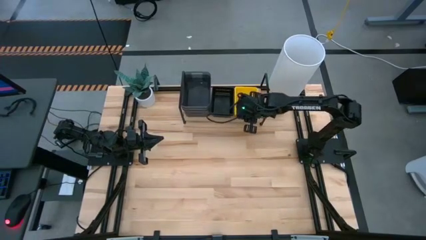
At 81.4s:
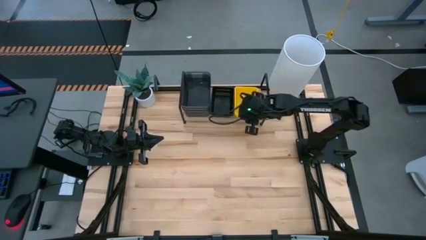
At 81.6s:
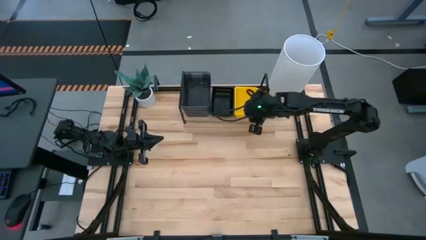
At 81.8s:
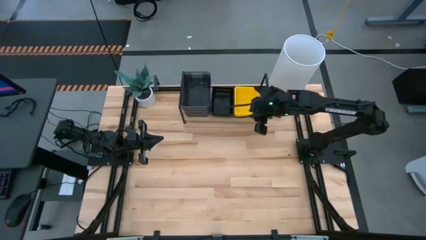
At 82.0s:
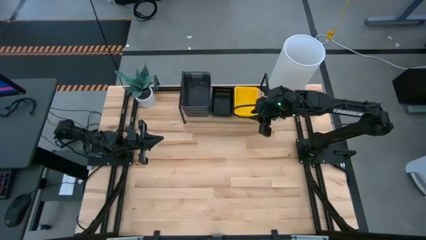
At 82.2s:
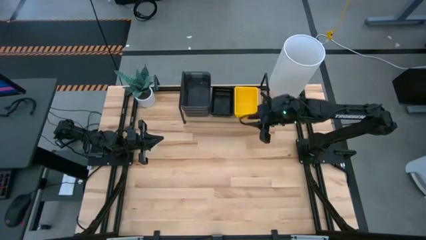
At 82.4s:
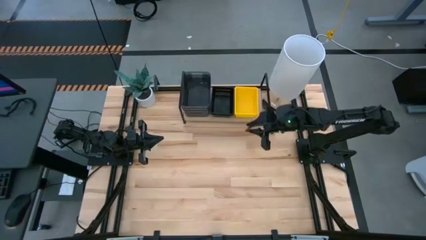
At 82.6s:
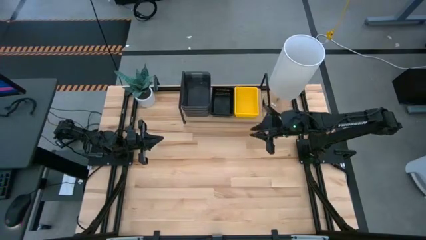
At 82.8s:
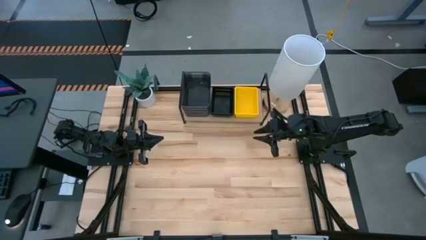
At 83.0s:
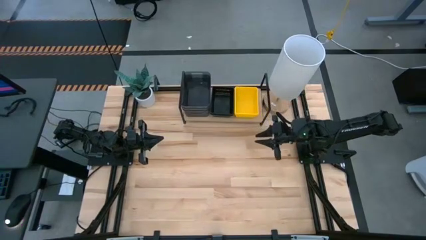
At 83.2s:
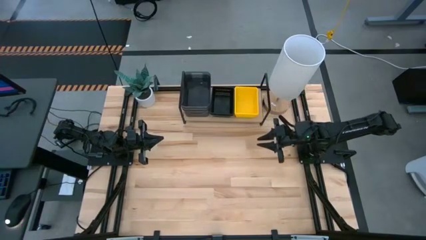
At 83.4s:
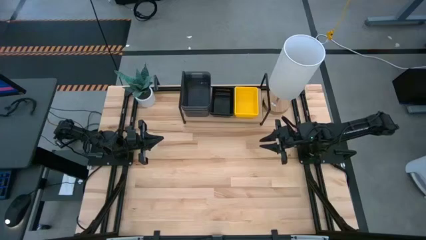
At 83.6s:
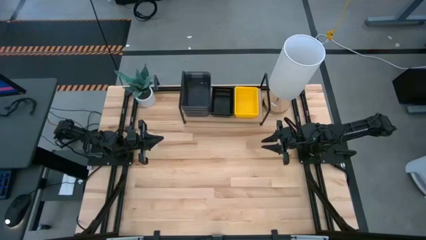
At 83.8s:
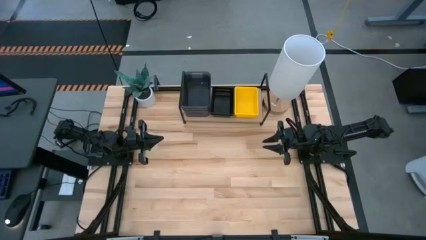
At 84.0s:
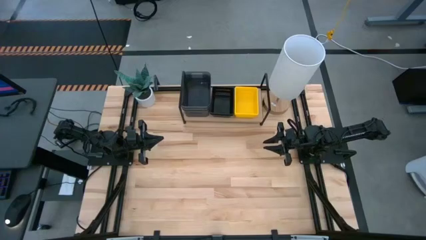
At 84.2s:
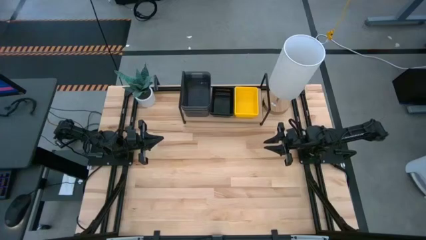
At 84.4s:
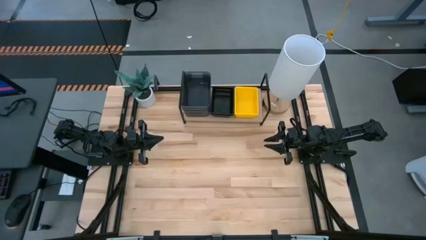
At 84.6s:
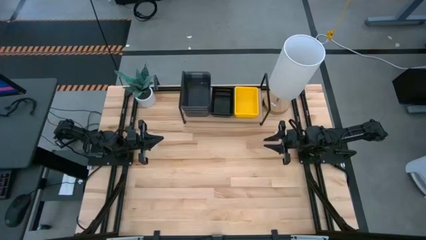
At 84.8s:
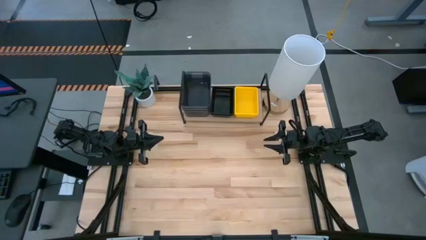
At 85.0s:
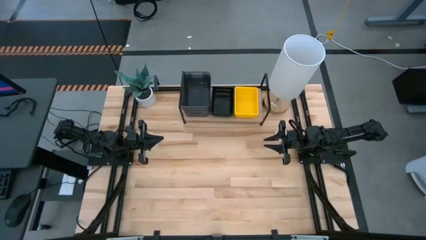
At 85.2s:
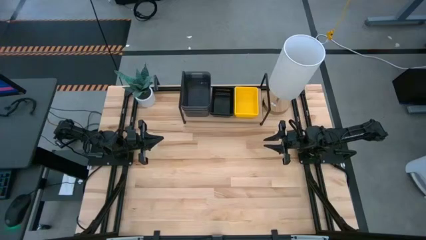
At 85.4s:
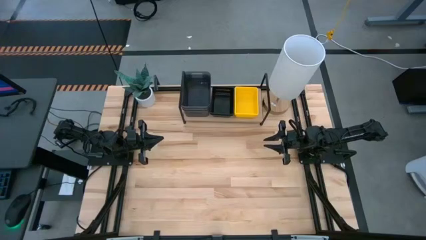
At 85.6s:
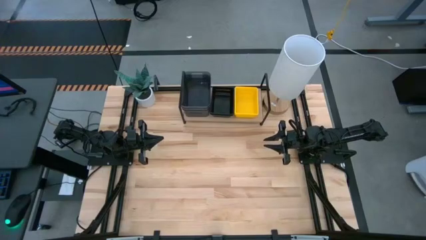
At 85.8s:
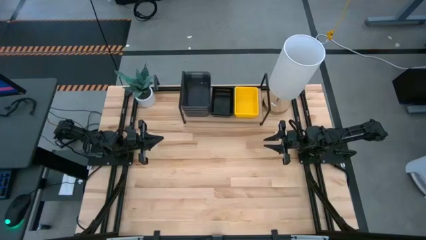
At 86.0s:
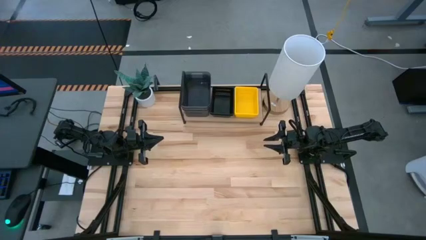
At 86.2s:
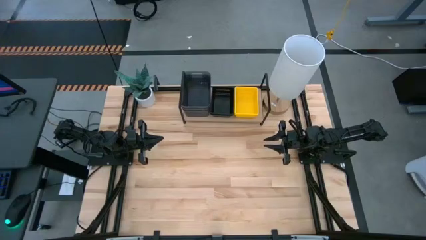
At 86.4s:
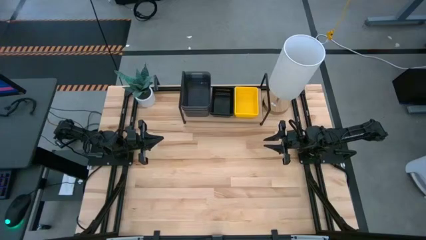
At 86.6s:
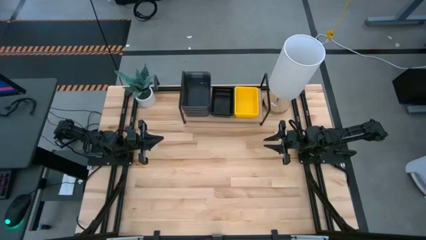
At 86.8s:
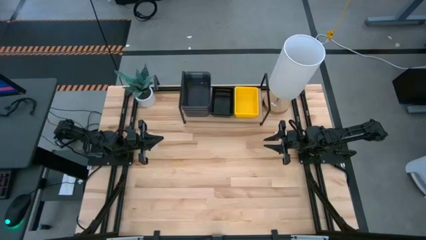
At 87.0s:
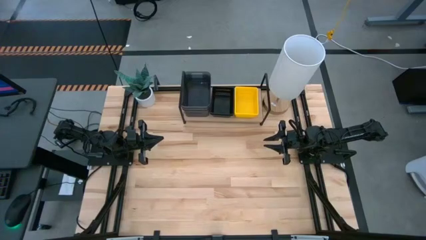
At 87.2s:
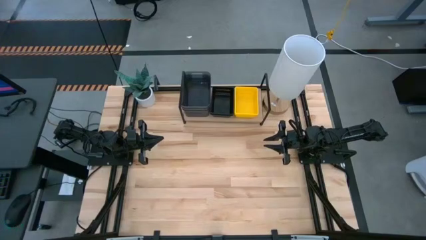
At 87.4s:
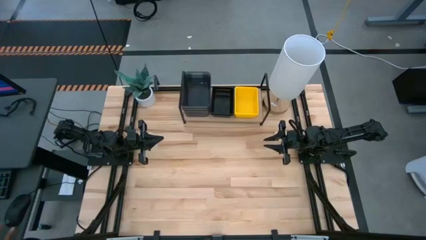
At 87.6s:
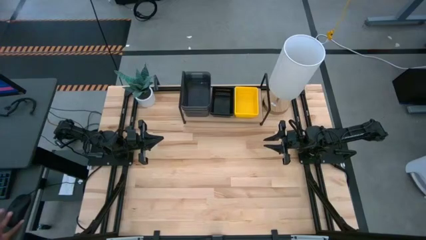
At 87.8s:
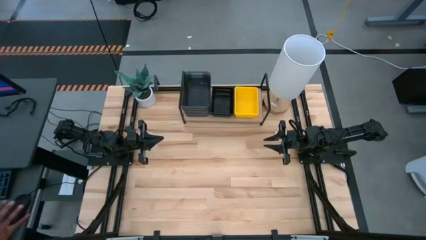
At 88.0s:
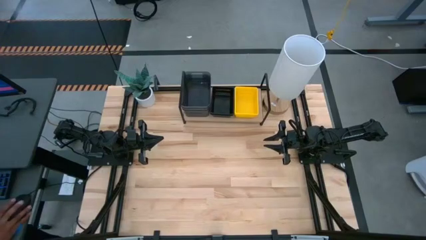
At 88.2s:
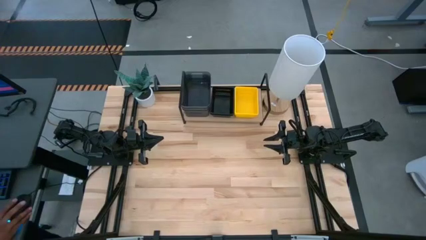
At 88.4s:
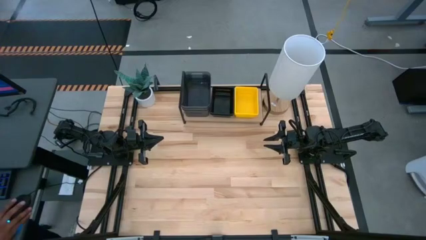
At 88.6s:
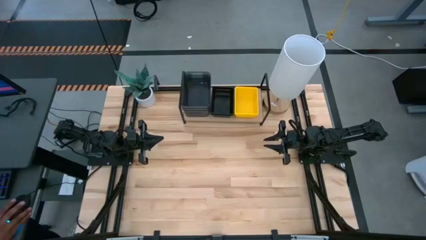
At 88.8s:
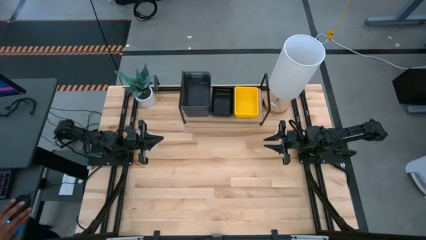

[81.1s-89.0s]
Task: Stack baskets on shelf by color
Return to Home Position

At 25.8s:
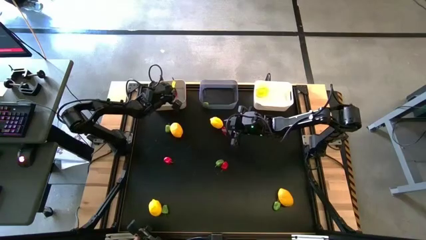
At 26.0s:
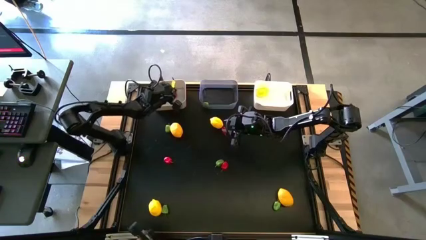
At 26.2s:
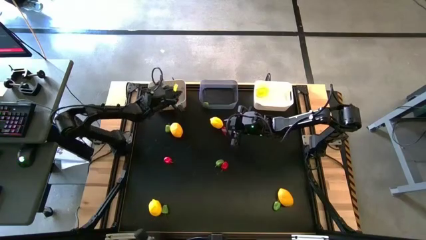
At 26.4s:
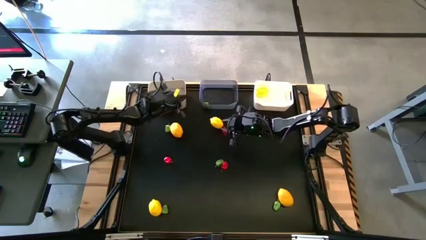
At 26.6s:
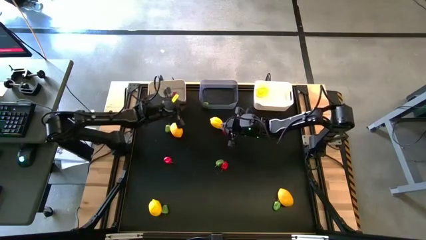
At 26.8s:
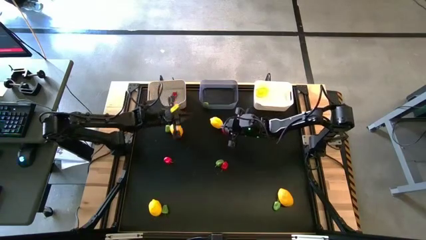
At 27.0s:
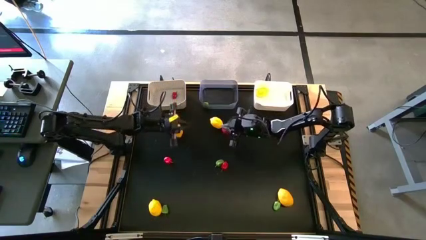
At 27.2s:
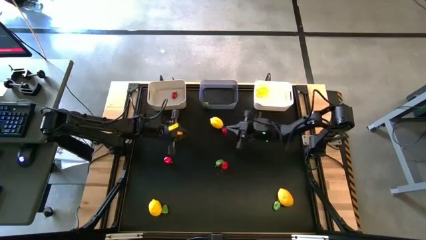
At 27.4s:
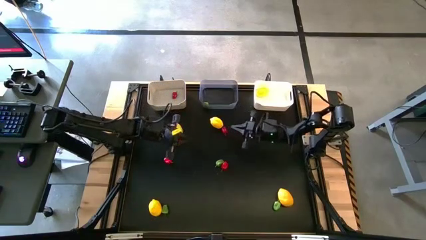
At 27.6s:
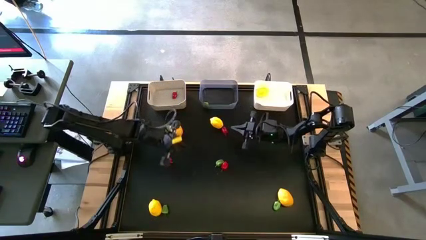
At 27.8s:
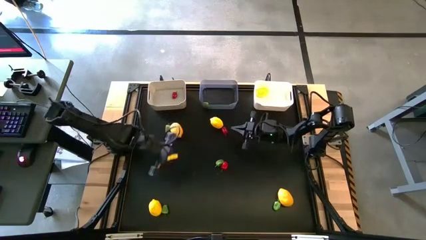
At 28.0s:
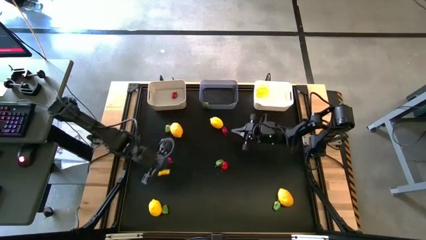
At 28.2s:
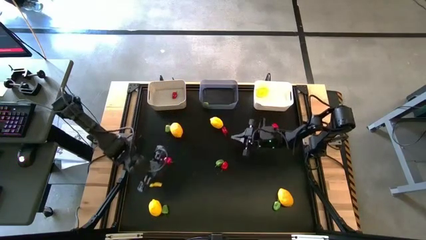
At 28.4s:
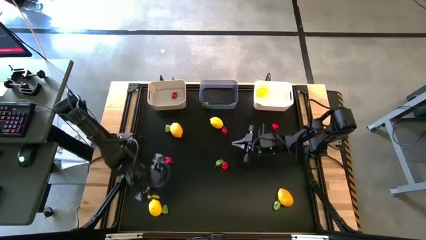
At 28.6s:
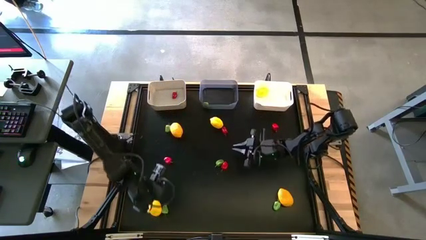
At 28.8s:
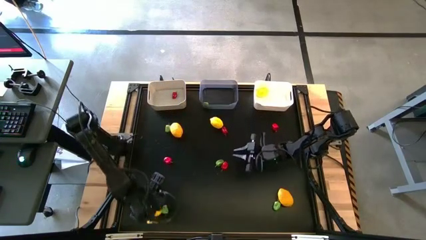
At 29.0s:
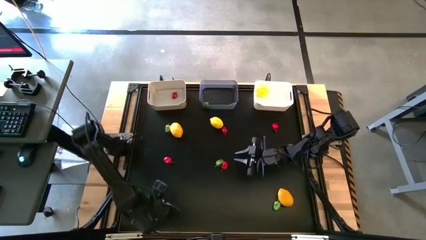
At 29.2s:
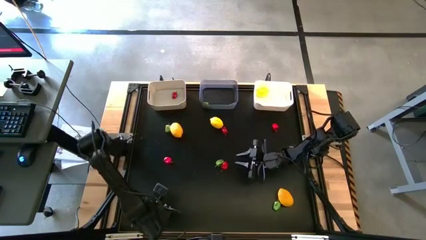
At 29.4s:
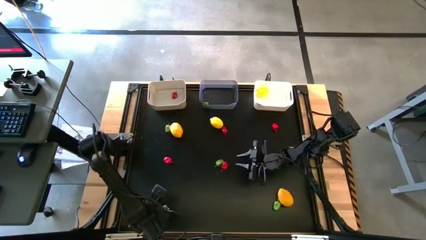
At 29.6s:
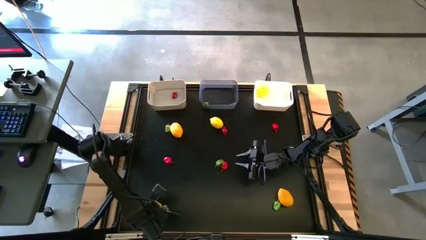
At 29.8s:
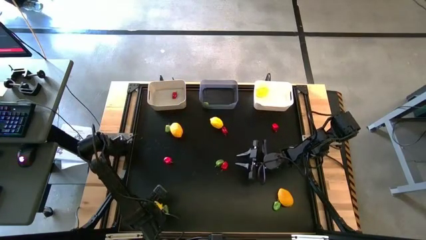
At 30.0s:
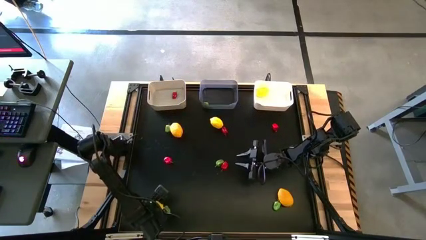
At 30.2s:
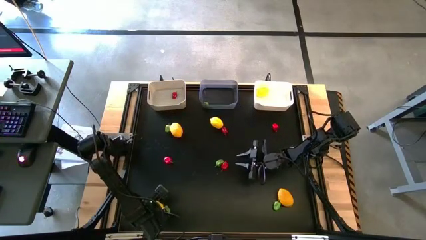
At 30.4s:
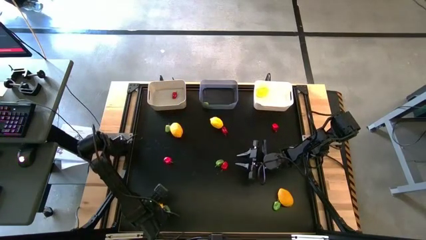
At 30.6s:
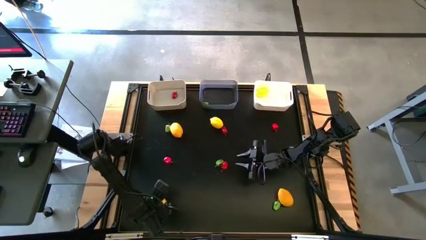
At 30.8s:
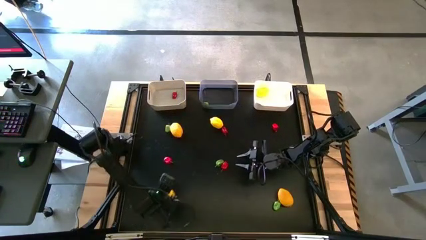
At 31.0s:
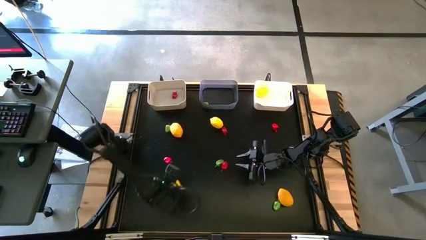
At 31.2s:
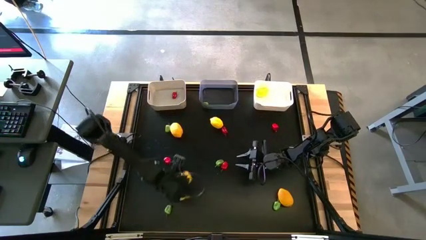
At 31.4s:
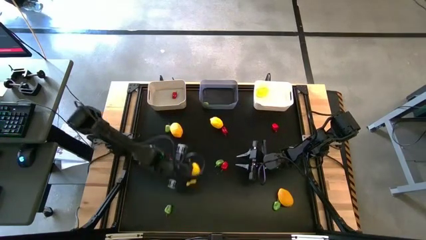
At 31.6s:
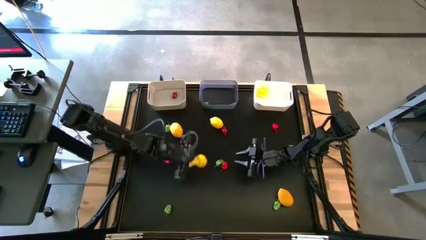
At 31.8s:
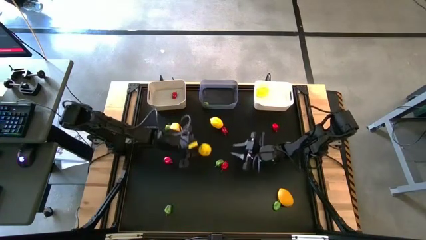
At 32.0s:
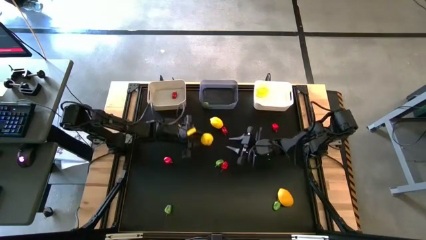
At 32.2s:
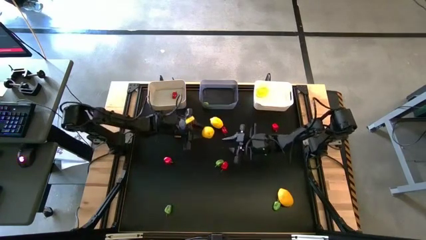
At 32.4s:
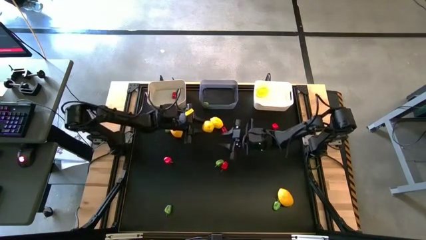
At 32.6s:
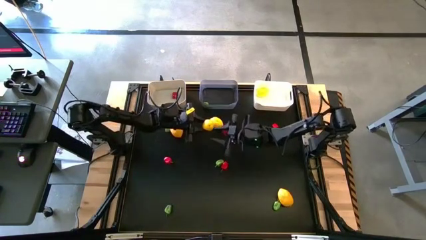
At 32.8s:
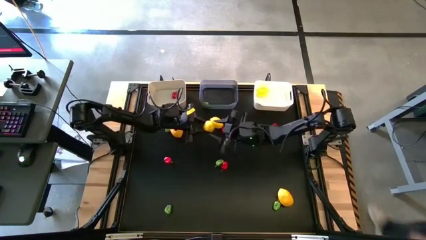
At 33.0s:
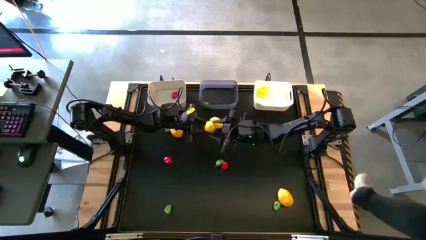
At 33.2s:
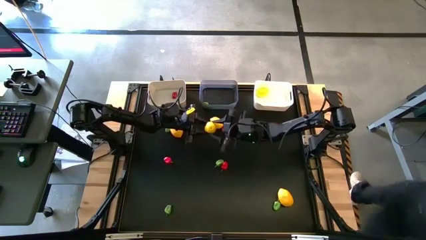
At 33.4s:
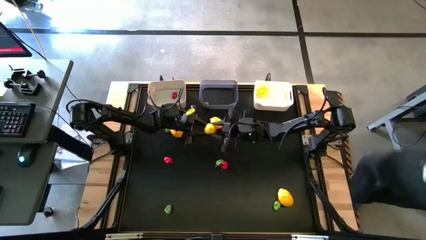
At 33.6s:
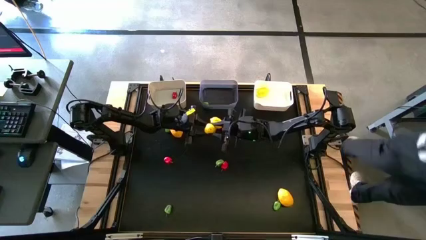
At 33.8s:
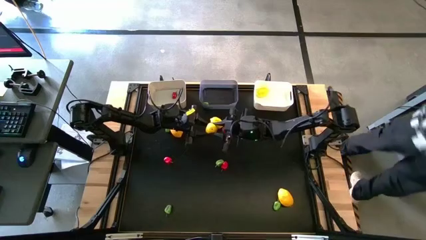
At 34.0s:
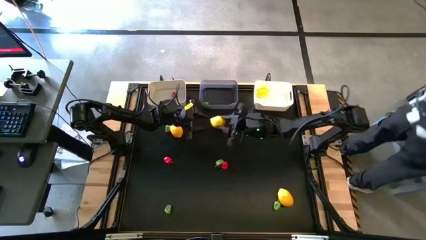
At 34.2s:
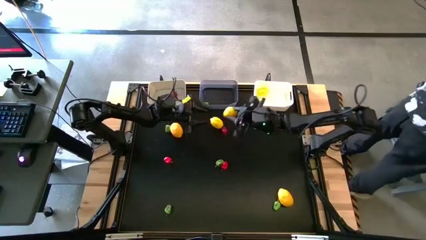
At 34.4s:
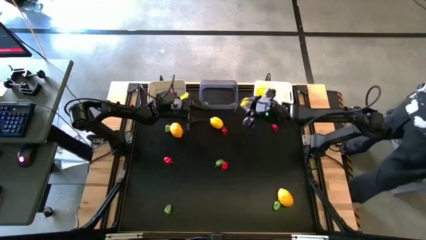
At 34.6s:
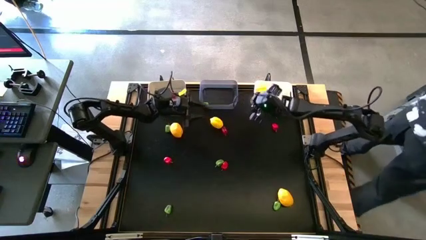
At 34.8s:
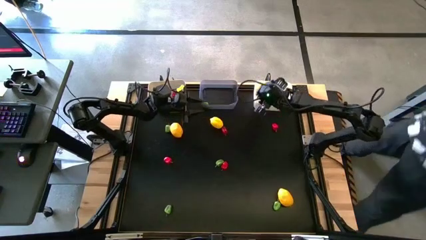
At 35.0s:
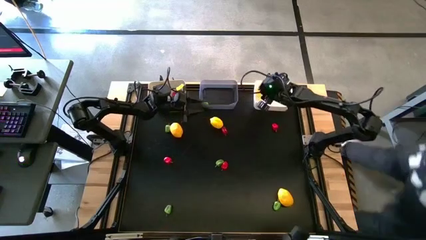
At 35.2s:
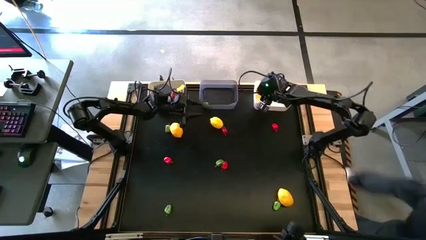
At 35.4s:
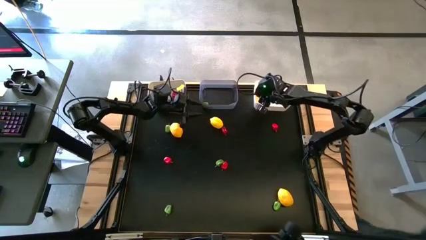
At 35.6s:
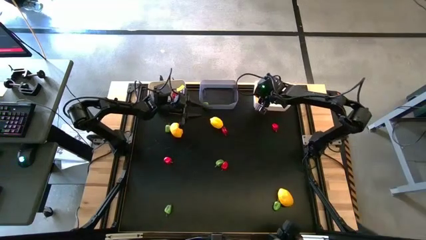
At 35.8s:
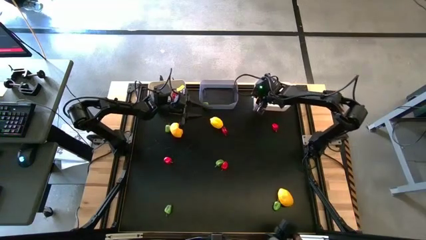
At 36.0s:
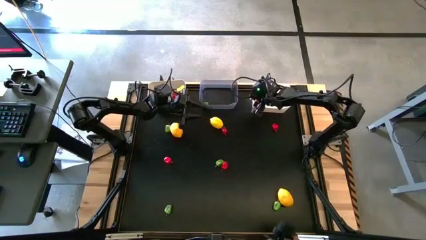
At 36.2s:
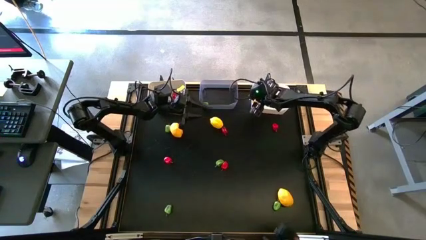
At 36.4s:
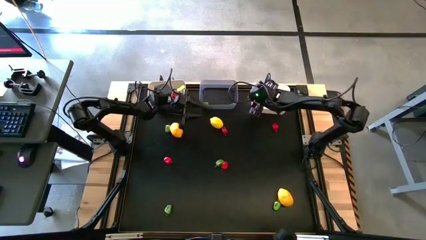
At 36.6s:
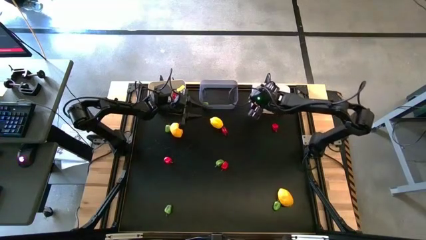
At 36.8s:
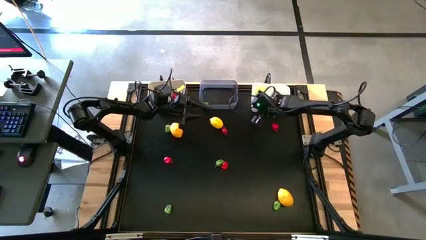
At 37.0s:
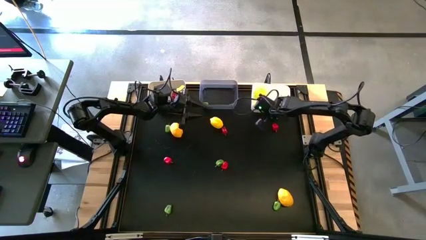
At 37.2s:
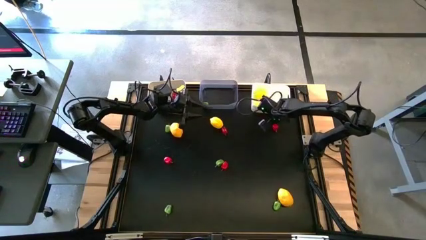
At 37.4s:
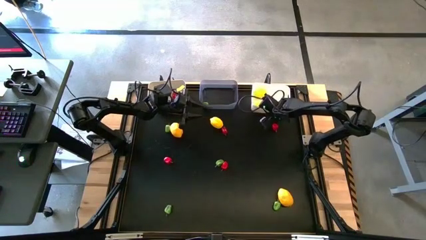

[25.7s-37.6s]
Task: Sort produce into baskets
Put the lemon into the white bin
